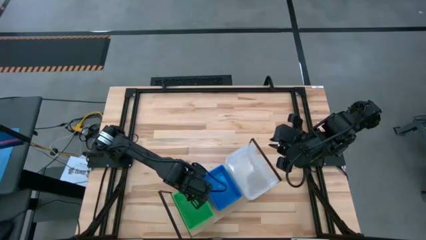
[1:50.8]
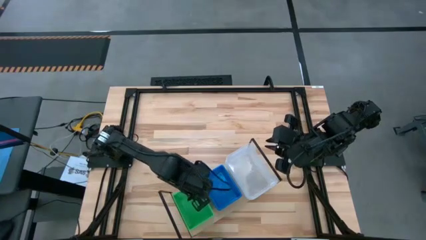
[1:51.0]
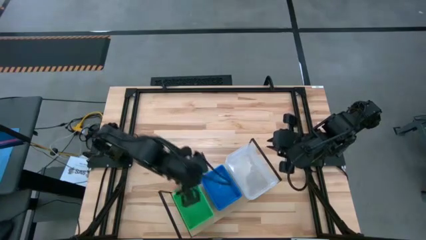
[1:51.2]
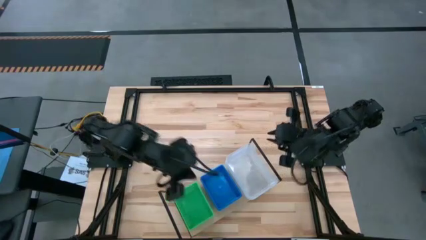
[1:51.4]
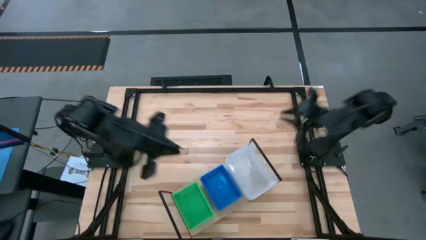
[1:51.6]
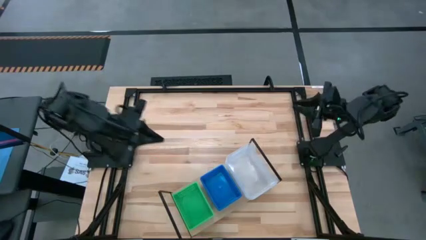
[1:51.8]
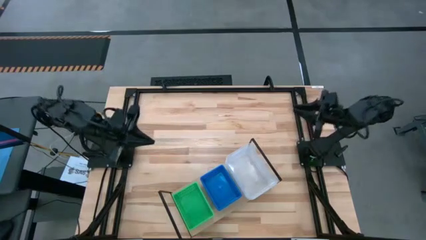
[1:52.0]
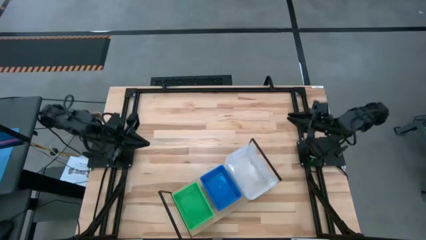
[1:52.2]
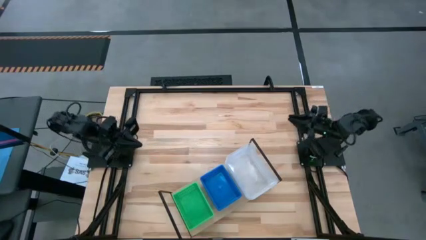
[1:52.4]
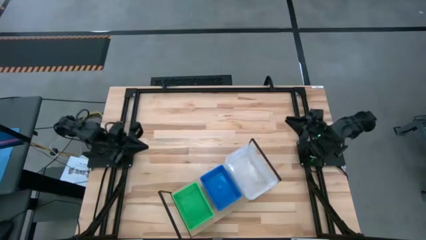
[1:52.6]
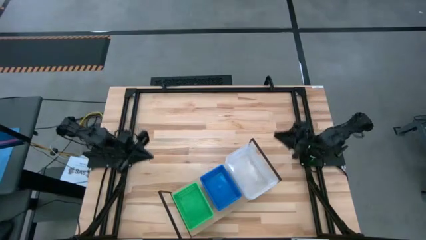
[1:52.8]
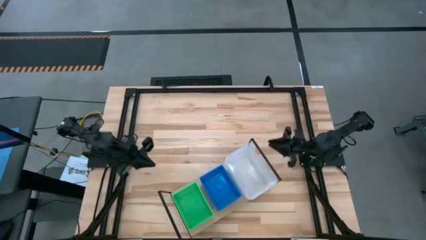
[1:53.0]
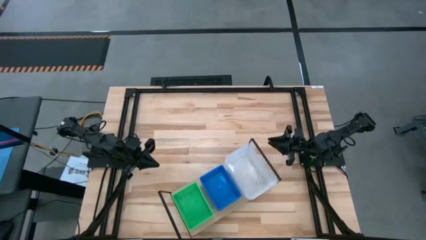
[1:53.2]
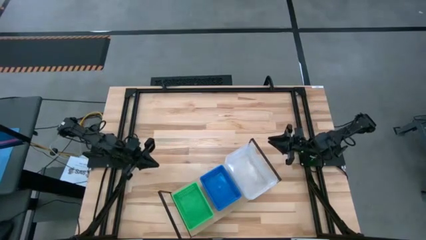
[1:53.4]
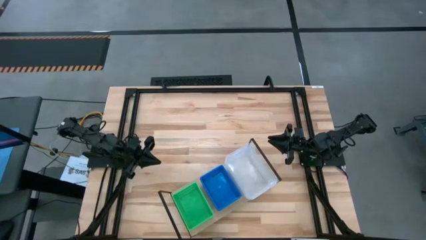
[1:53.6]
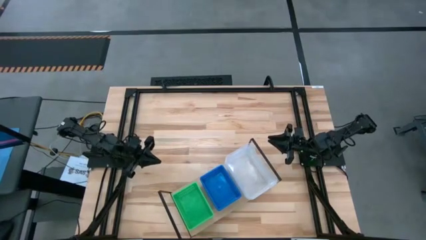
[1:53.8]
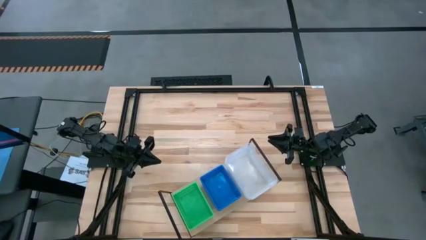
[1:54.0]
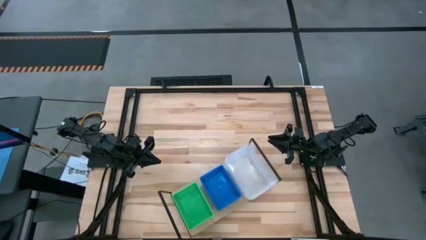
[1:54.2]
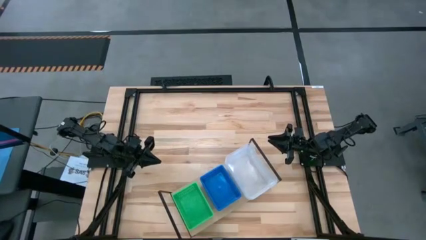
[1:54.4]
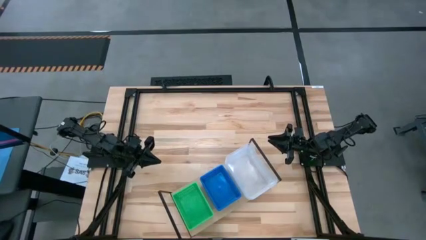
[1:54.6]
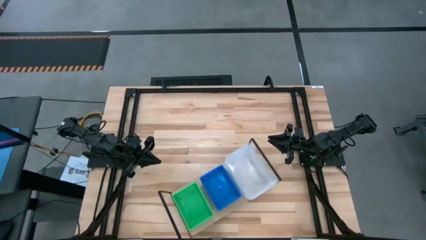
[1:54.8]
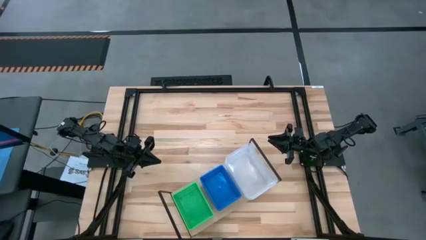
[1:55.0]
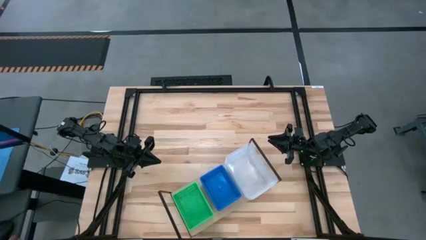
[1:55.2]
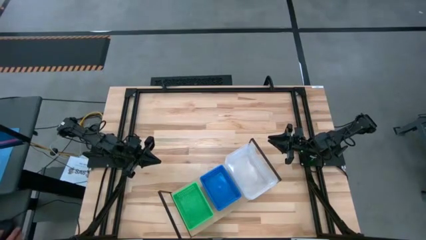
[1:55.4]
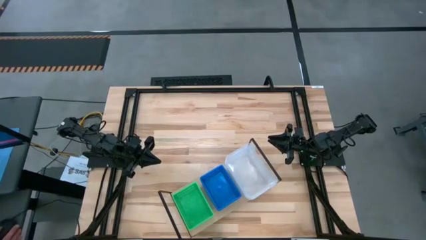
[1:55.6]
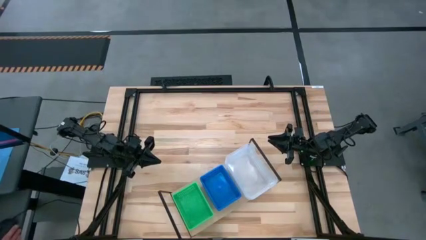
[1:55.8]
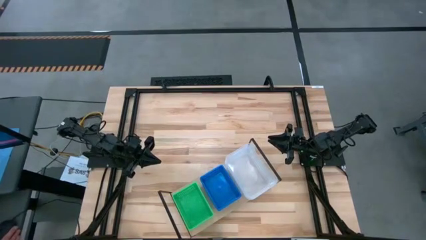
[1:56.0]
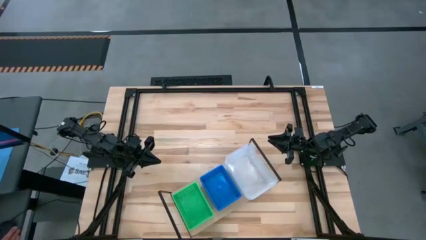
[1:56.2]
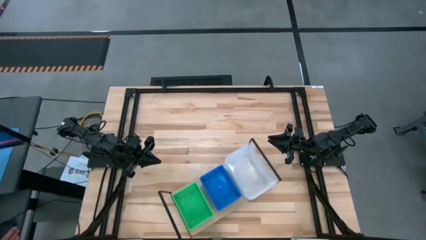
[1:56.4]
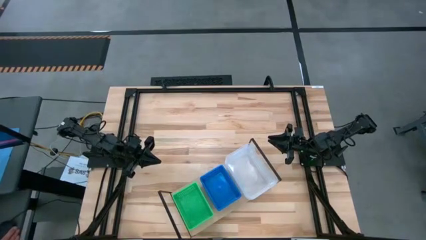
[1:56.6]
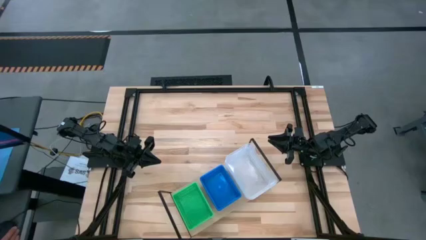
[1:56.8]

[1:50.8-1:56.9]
Task: Stack baskets on shelf by color
Return to Home Position

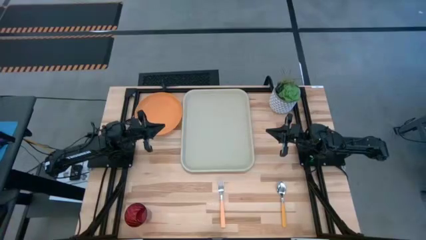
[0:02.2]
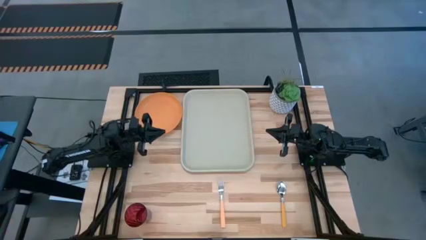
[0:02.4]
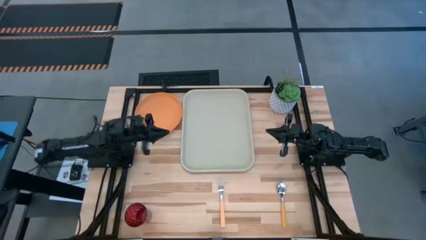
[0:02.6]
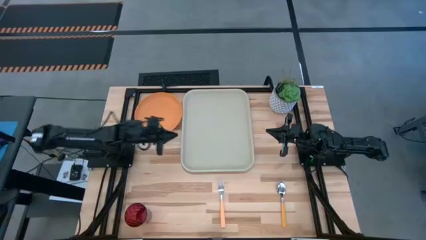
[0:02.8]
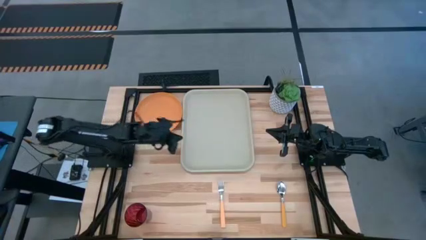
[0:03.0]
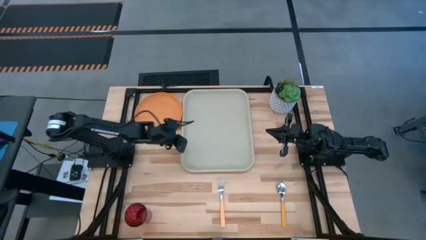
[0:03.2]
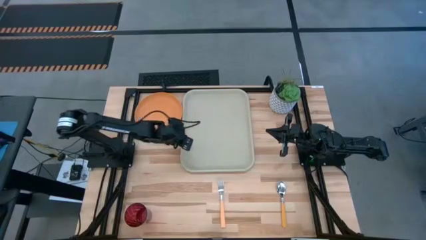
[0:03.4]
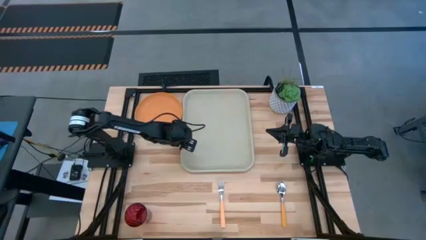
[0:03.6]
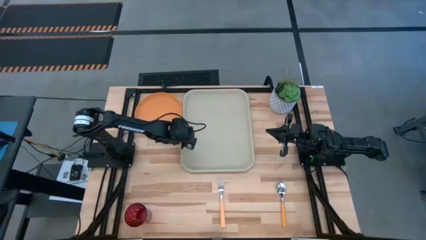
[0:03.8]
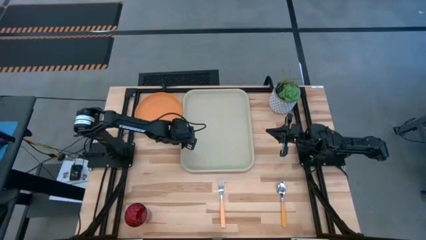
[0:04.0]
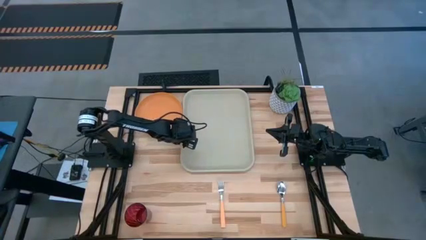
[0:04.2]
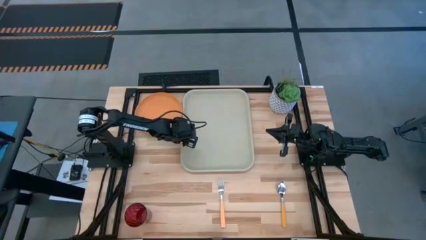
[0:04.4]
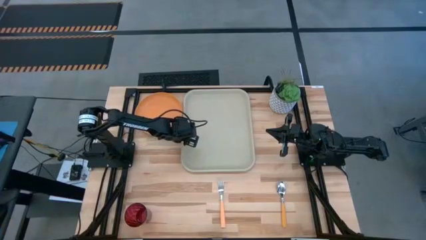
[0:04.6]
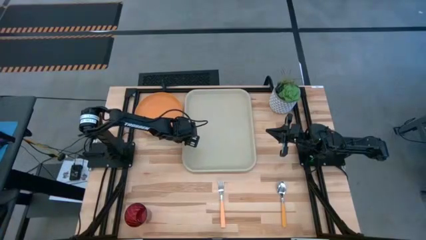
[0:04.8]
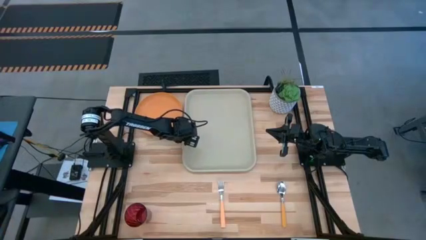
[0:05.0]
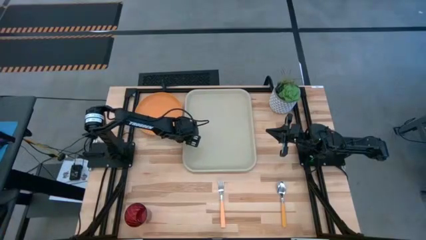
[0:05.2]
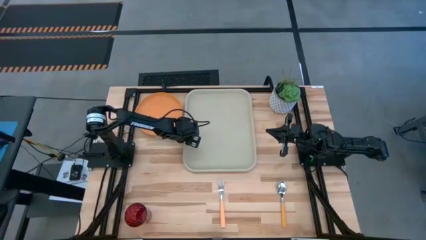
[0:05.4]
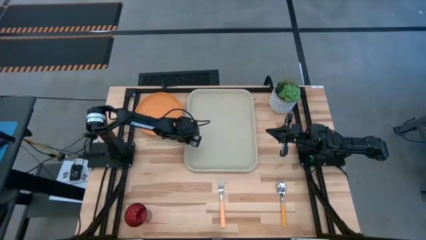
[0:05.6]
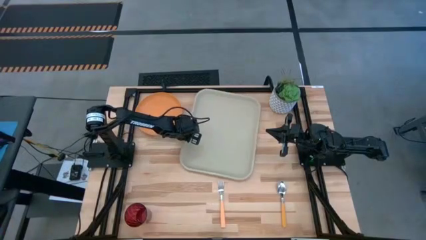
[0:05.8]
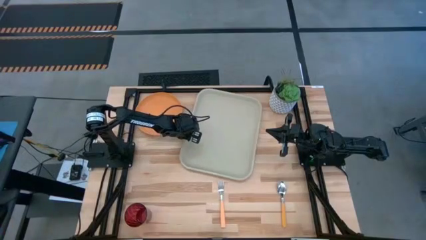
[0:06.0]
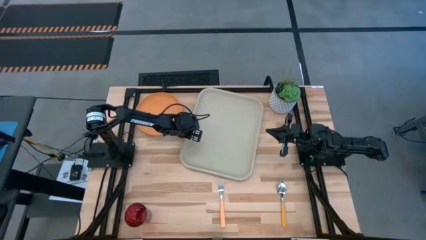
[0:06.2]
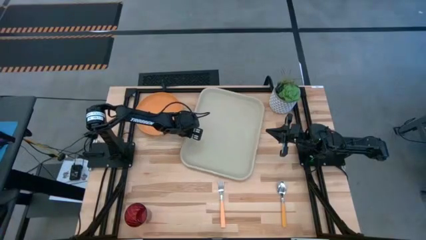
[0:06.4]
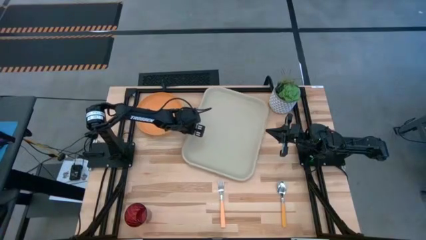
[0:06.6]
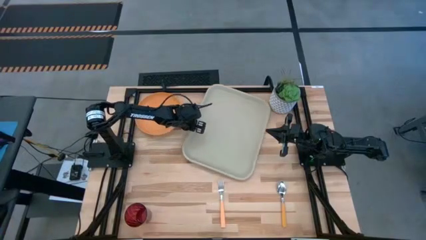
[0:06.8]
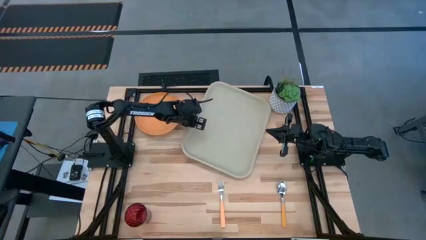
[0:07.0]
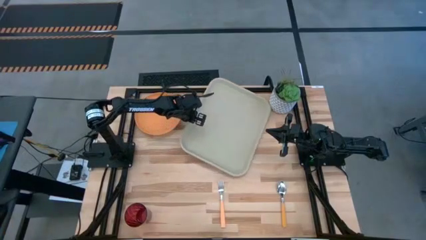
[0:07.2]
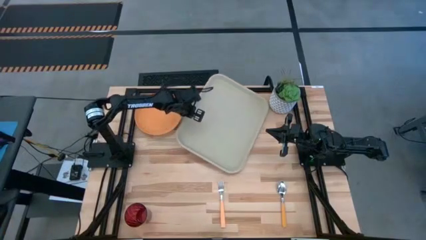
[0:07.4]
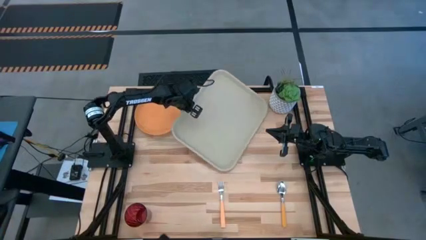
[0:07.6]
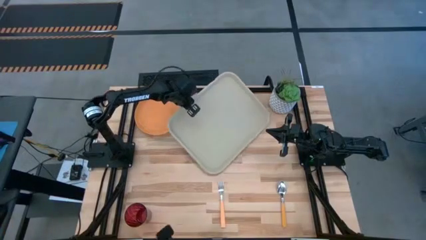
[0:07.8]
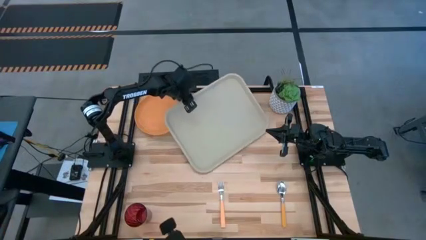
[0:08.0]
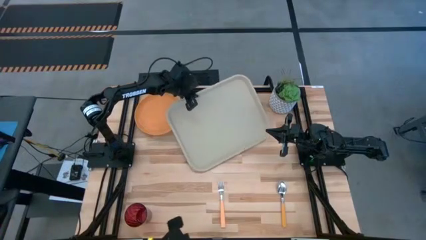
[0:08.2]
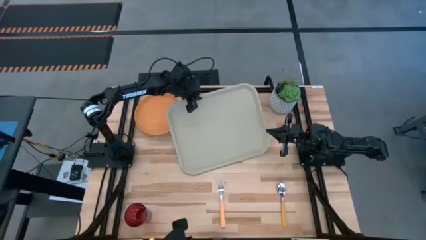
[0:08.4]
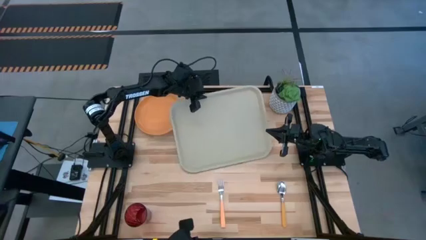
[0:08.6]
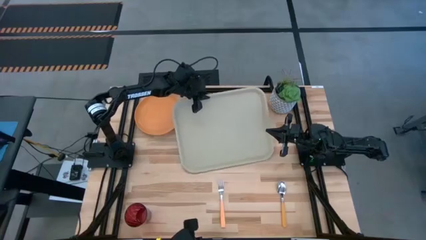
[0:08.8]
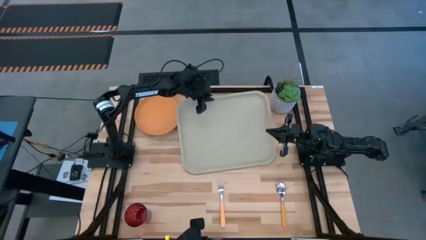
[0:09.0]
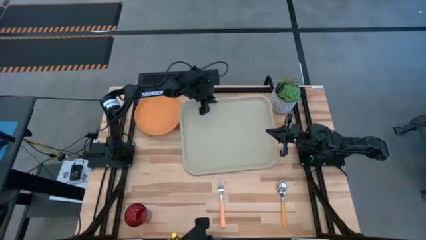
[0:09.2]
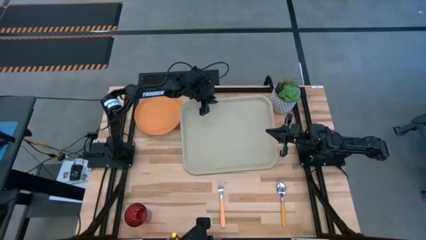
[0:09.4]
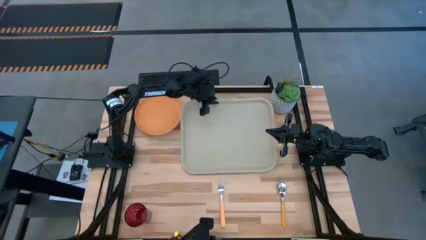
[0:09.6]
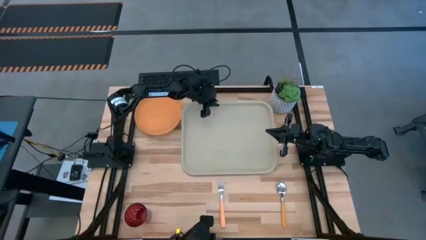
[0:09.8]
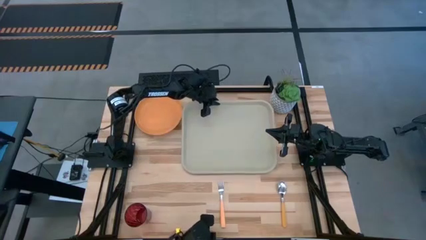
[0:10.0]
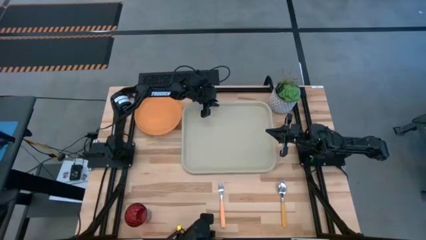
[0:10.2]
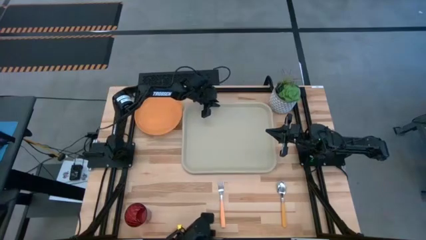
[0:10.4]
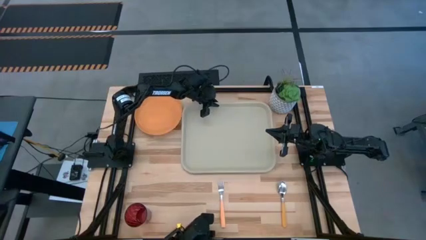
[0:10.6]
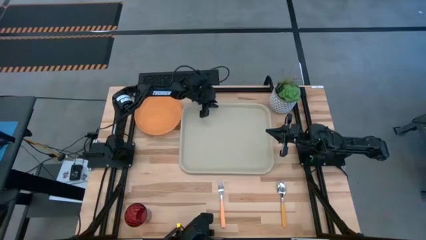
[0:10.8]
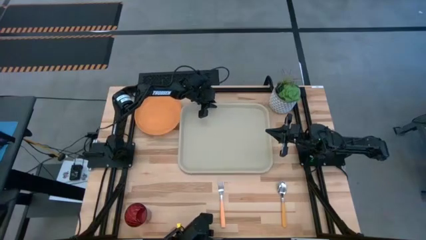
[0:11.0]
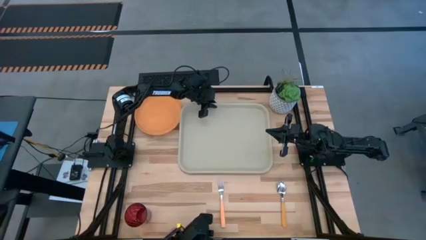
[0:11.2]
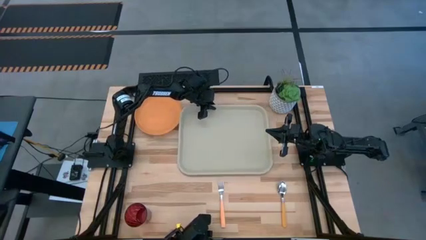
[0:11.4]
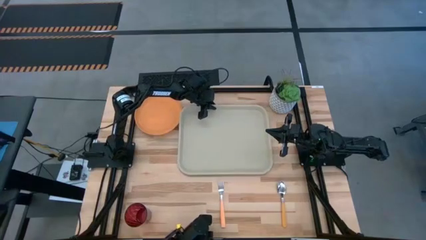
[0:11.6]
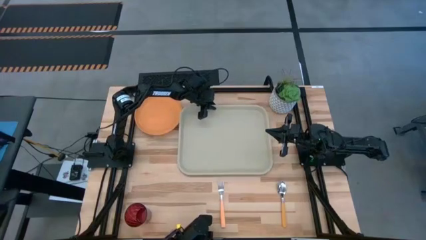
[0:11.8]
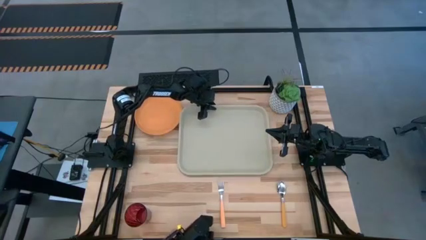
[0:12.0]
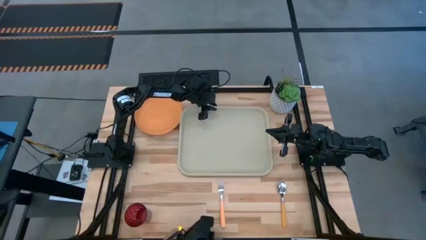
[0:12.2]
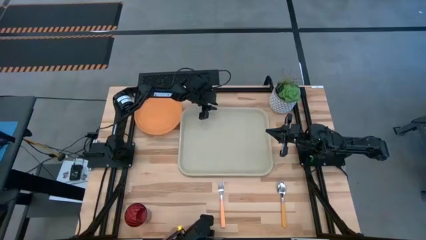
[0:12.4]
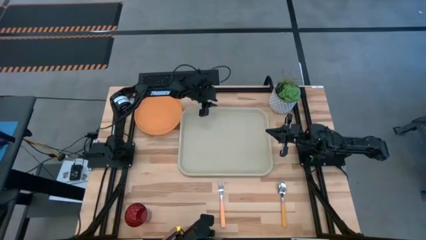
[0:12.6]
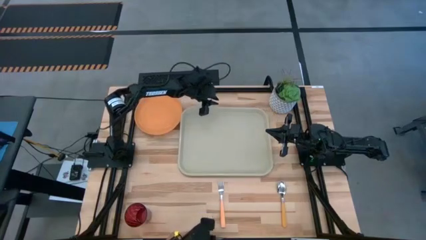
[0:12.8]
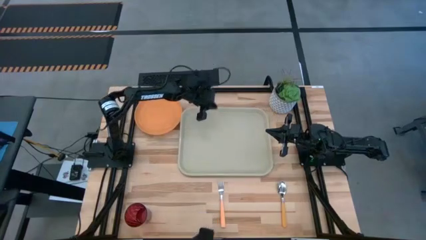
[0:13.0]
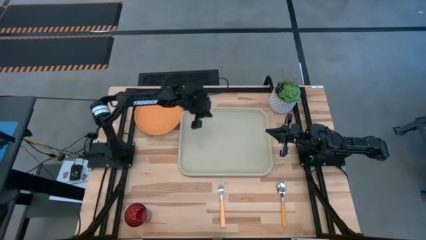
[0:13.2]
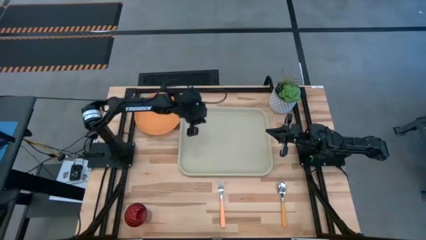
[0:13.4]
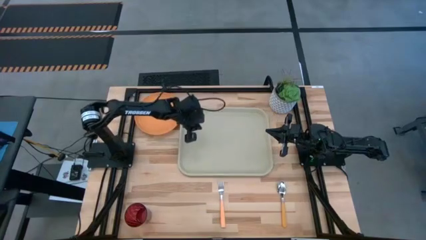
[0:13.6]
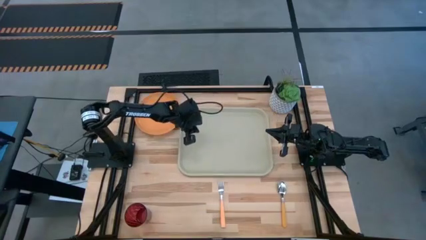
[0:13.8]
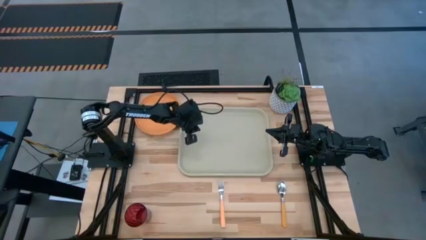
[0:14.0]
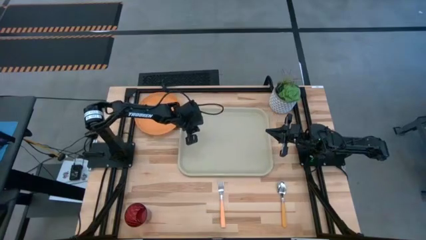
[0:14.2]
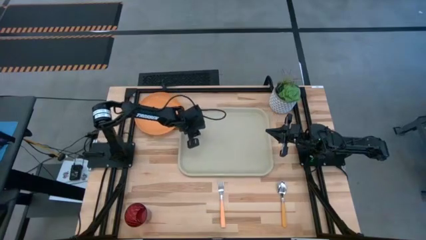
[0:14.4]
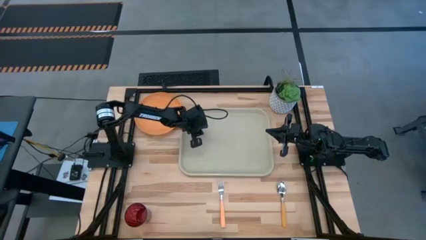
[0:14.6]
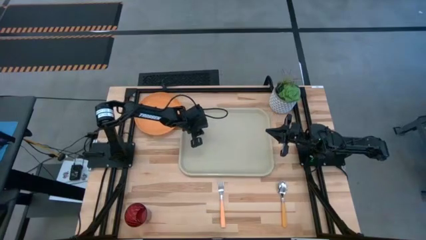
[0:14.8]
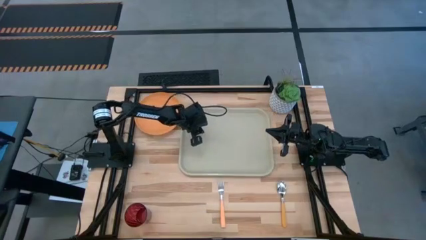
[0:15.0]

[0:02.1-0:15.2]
Task: Pick and place plate/cup/fork/spoon on tray
Prepare the gray serving tray
